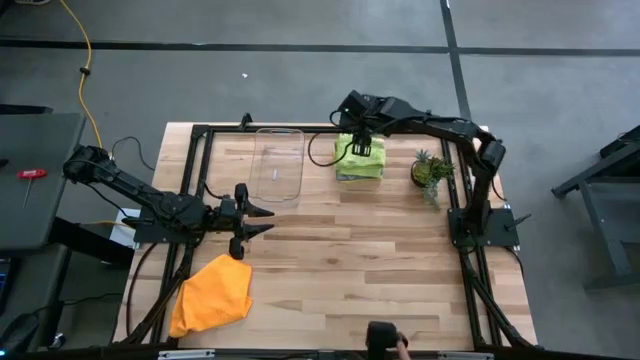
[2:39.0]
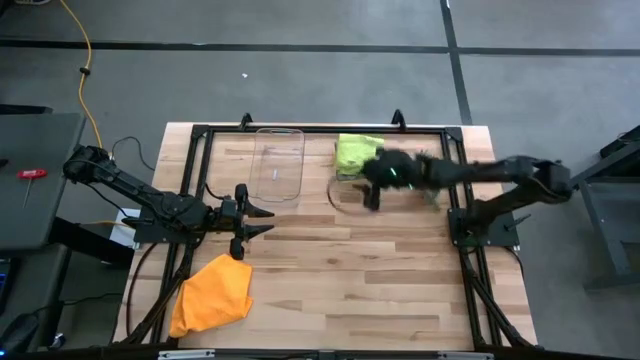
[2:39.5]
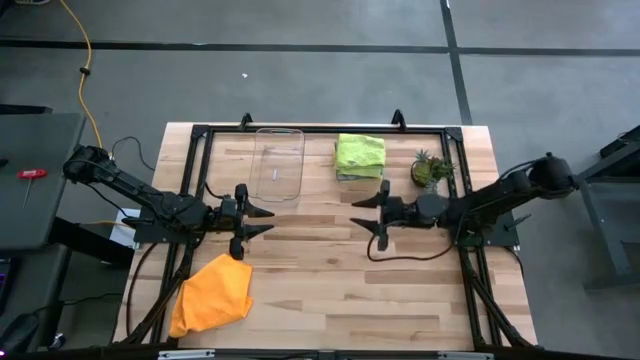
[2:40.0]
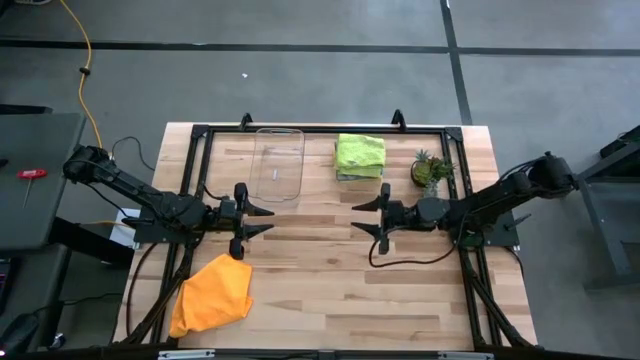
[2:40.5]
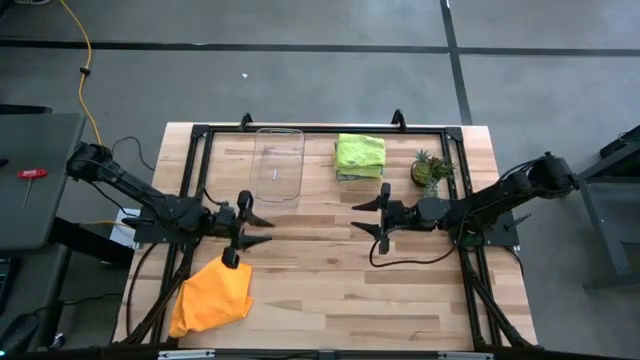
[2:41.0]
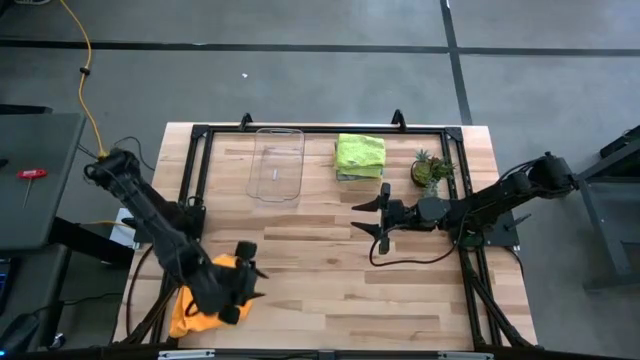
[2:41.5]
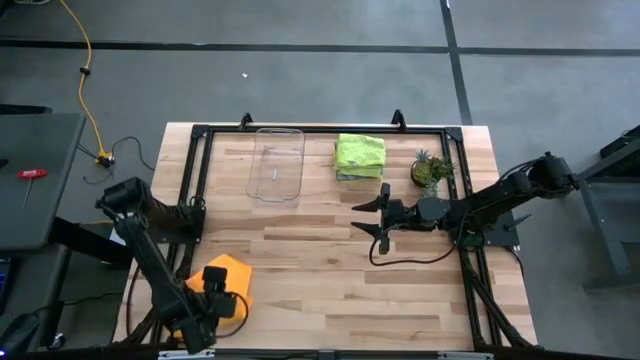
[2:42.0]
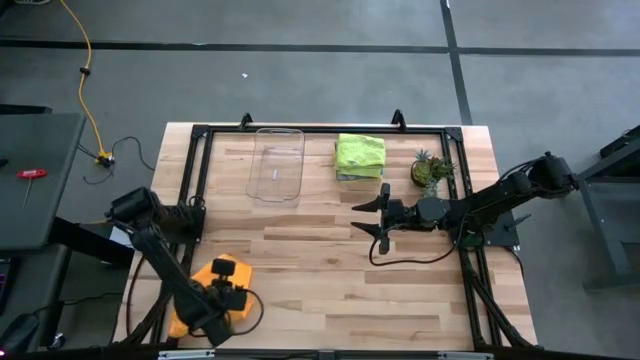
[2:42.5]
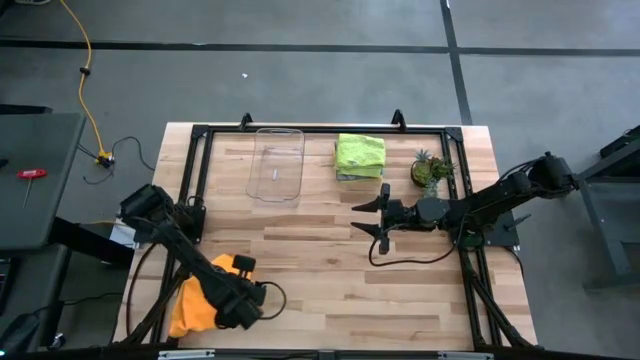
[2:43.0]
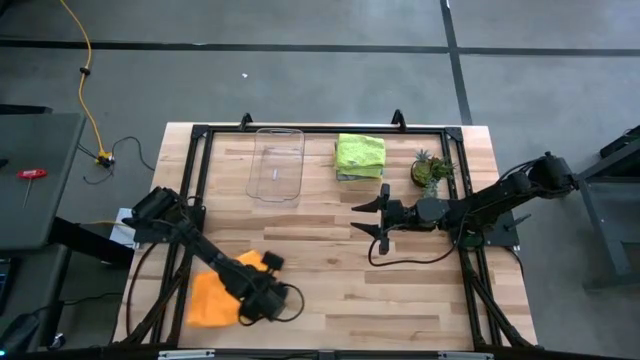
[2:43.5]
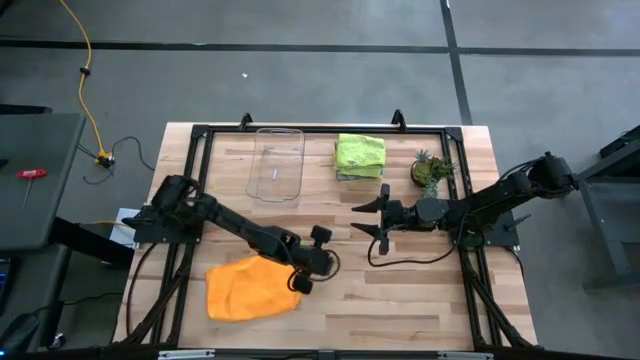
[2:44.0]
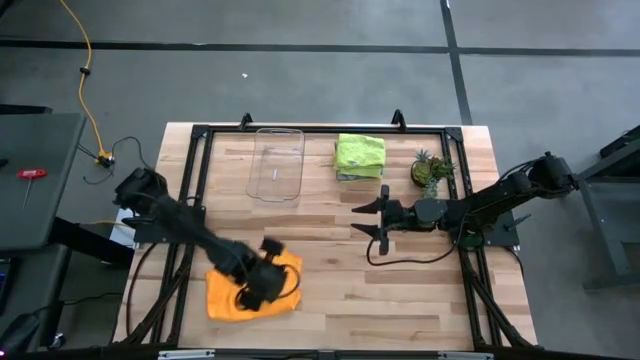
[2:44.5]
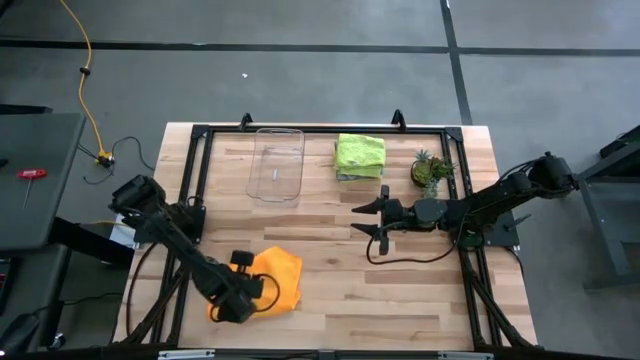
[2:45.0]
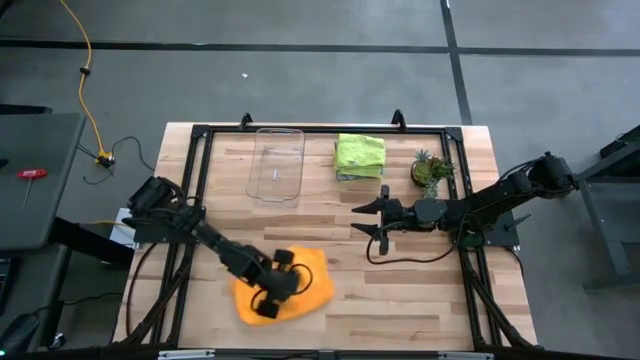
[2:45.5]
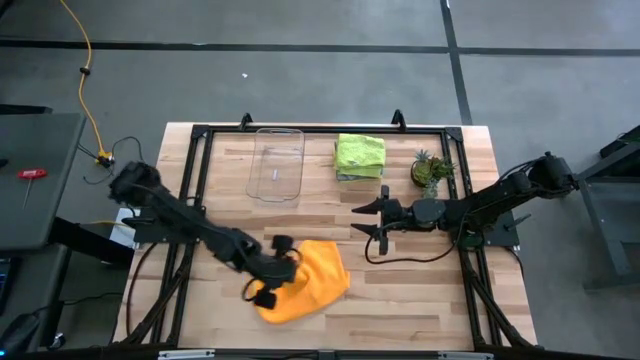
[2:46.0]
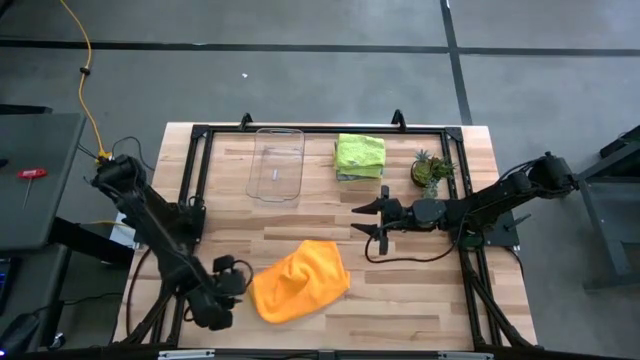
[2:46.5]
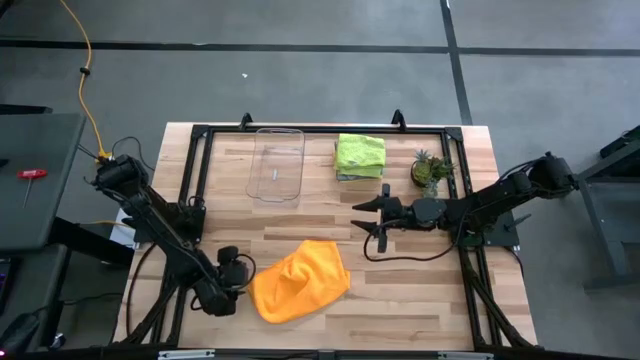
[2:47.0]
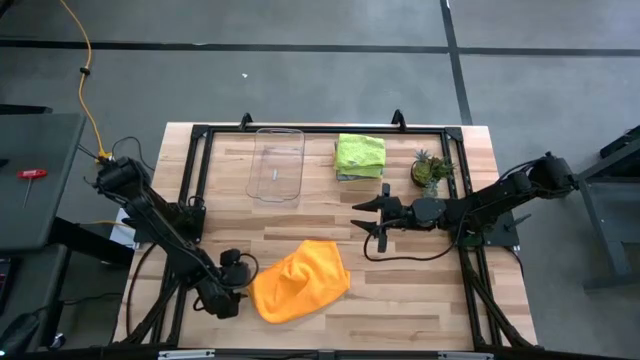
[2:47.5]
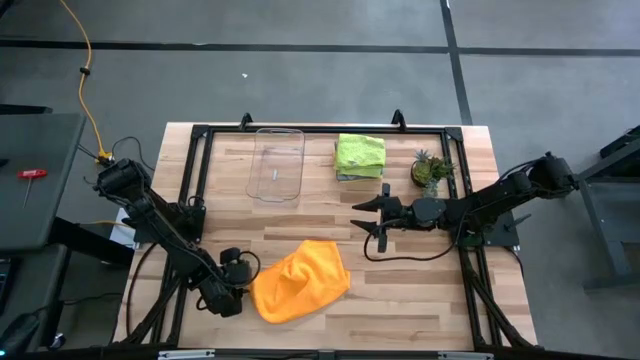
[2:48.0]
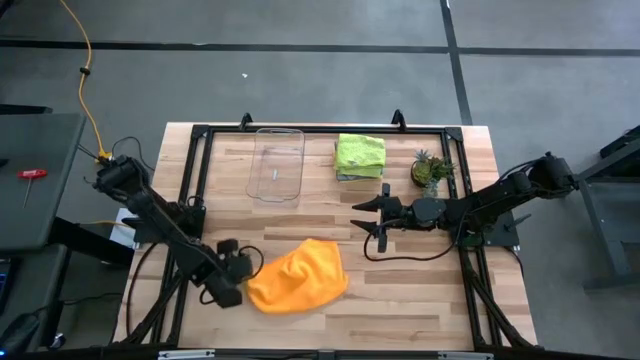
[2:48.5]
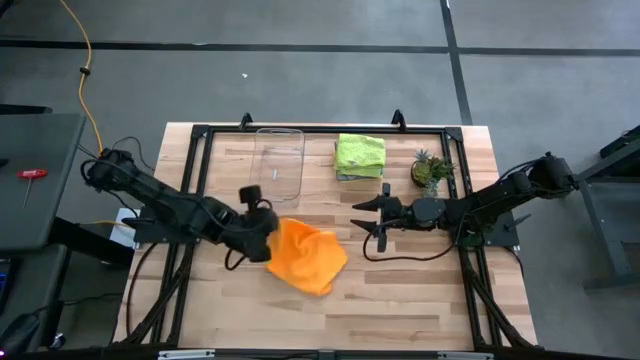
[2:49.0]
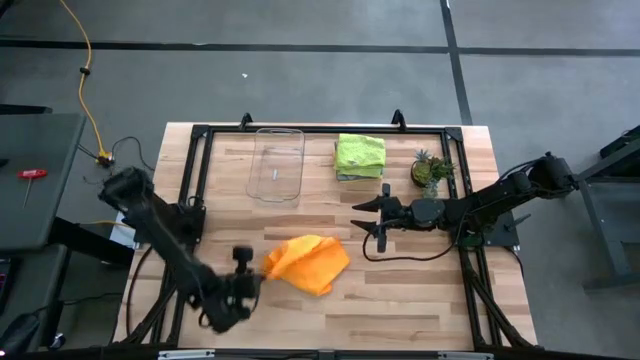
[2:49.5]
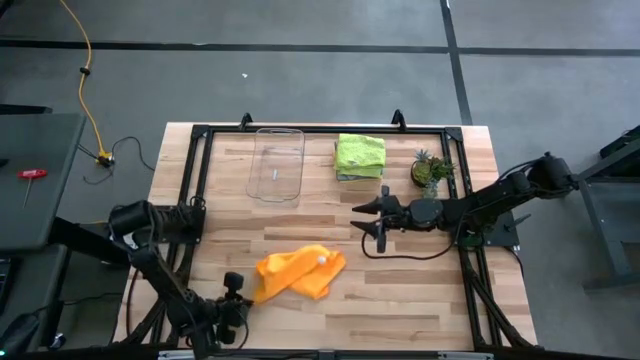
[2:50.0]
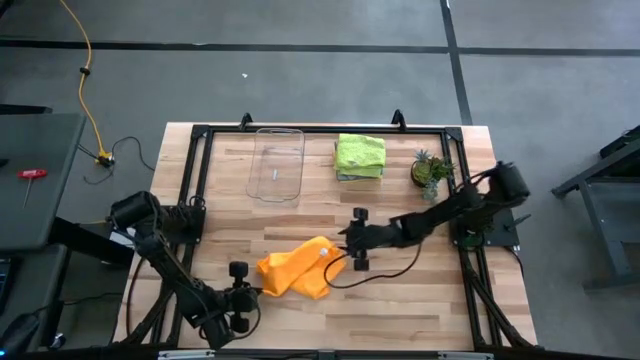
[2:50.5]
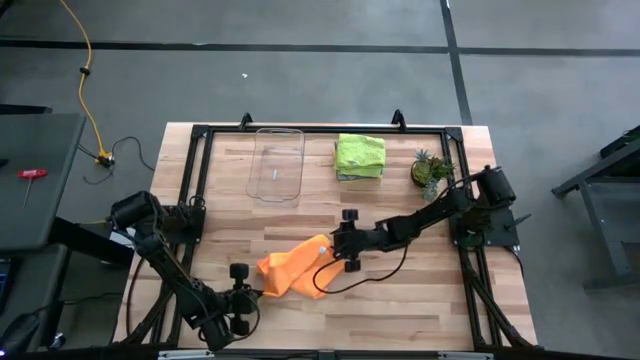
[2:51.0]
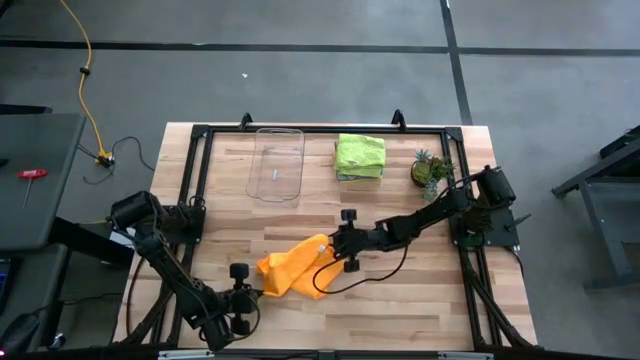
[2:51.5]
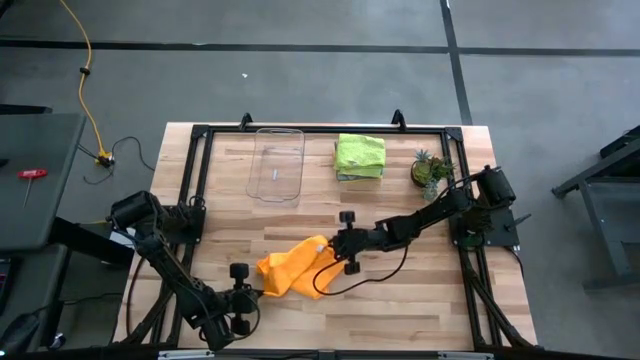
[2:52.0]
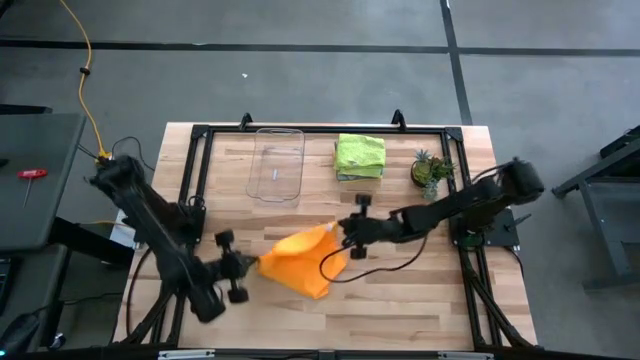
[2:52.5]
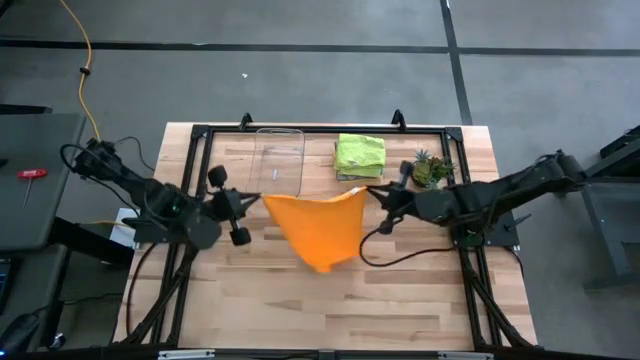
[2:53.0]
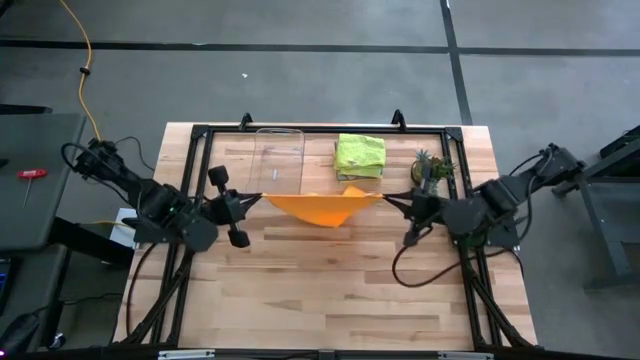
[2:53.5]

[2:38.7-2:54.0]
Task: Fold microfiber towels
Fold the orange microfiber cloth

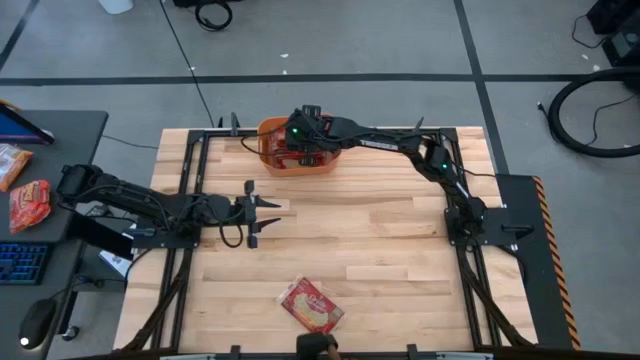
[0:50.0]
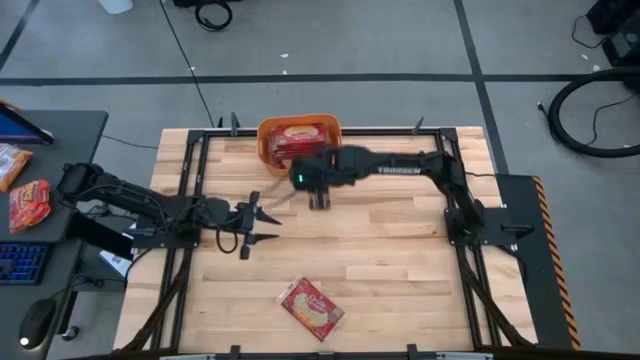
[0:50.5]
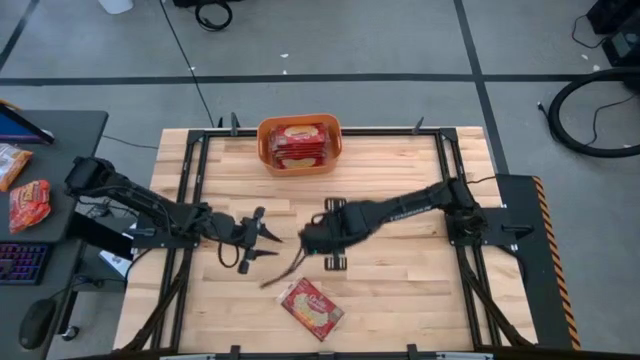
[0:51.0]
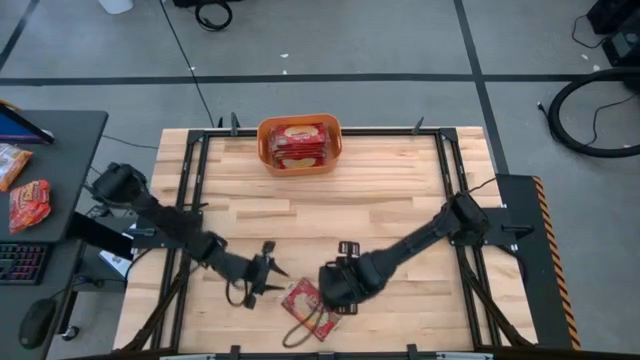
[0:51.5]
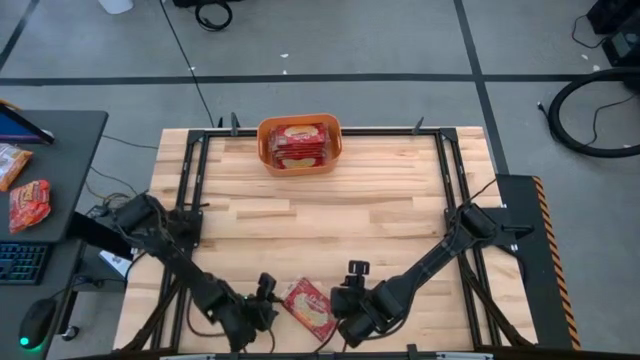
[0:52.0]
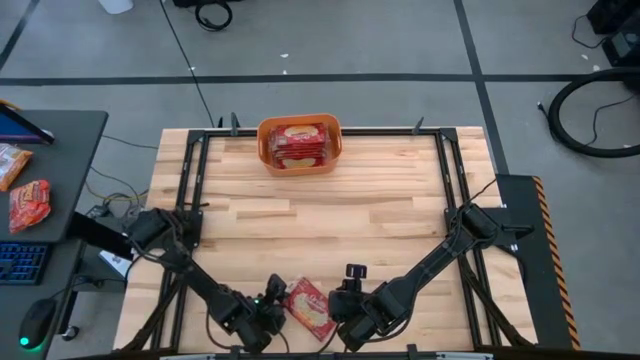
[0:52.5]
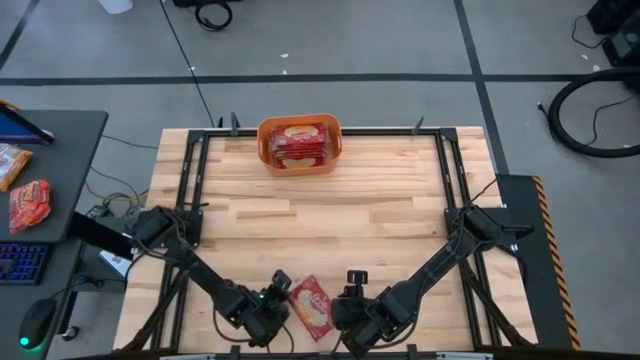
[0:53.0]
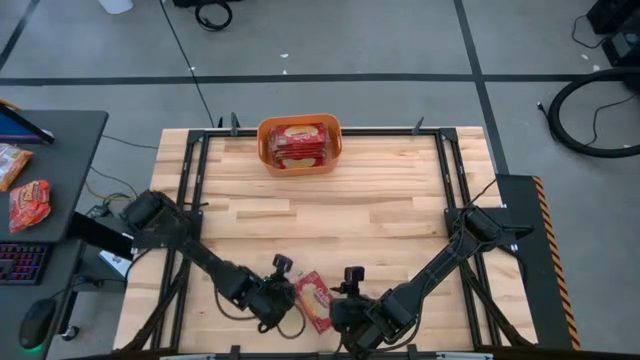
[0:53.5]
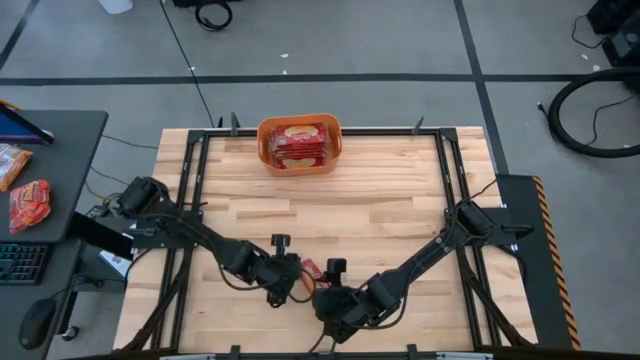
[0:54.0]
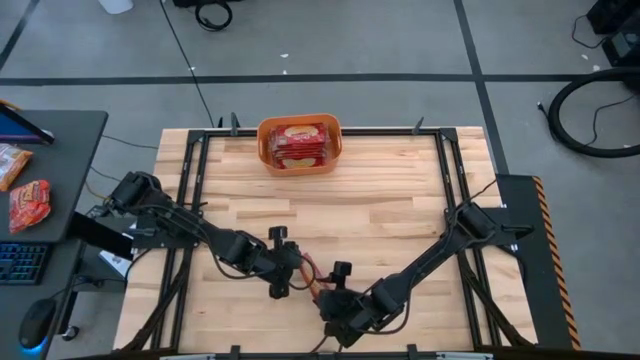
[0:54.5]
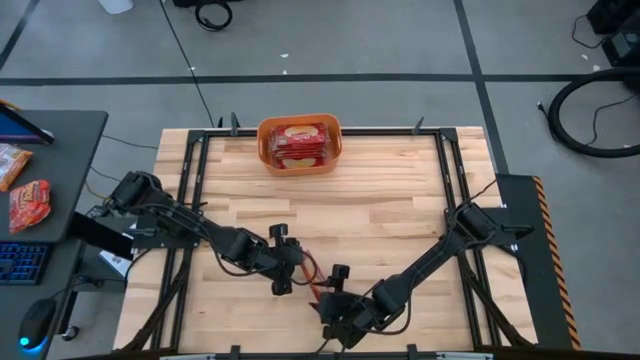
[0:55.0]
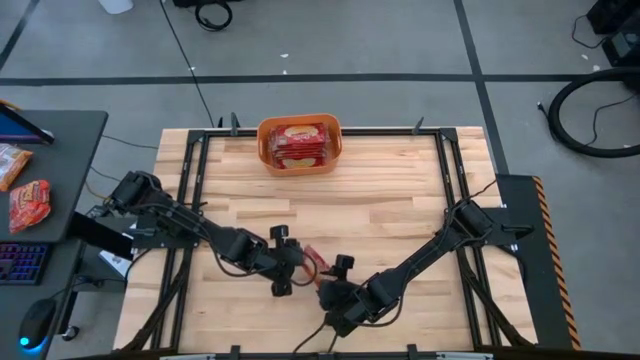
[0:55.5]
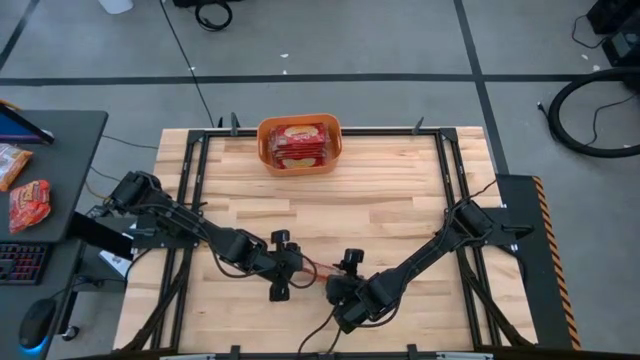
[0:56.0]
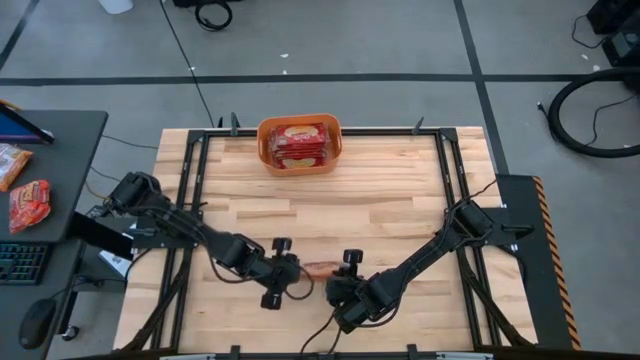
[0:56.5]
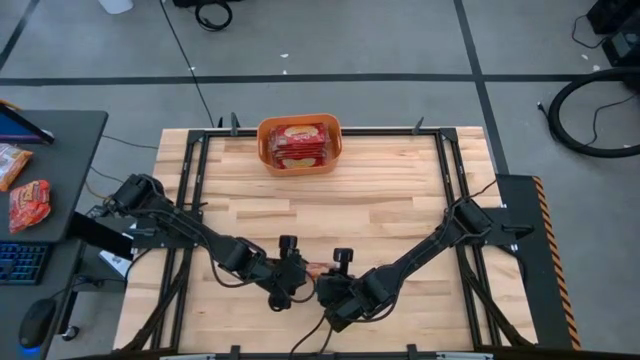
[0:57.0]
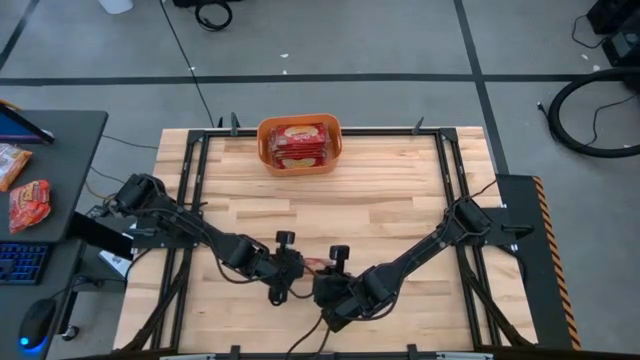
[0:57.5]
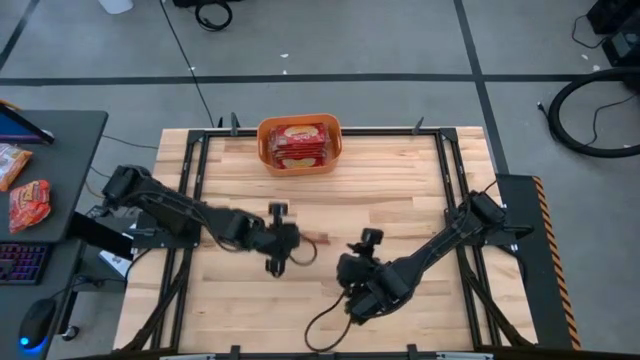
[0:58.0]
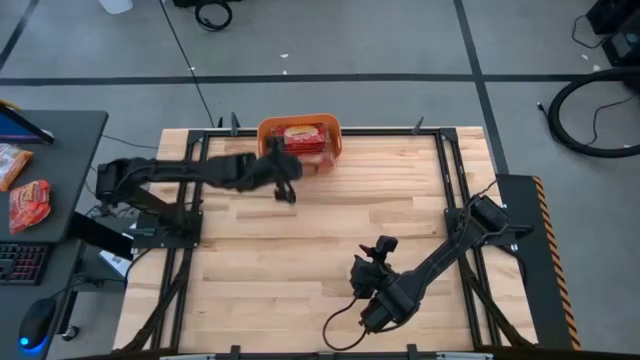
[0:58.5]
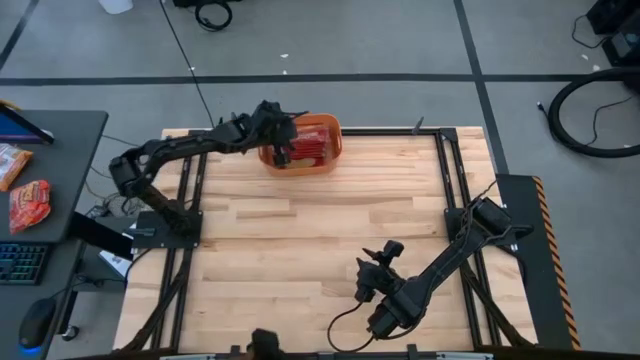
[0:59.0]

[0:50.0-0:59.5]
Task: Sort popcorn bags into baskets
Put the red popcorn bag into the orange bin
